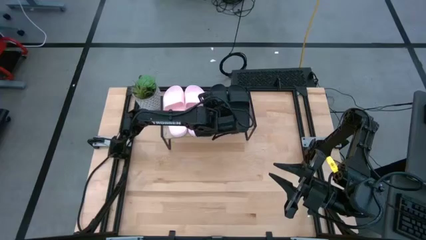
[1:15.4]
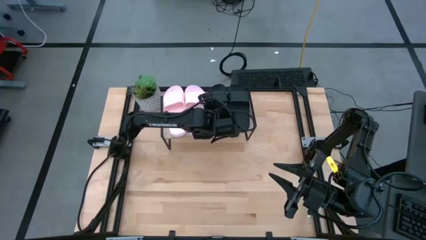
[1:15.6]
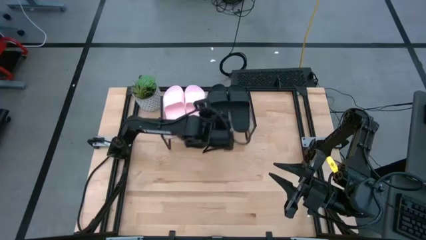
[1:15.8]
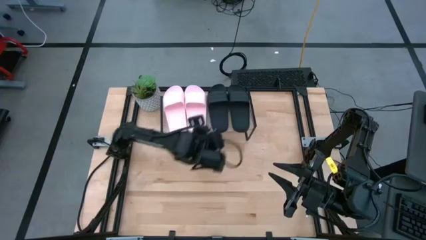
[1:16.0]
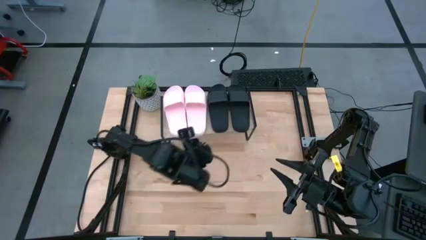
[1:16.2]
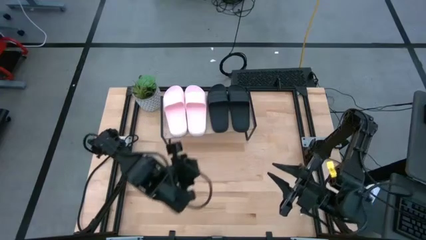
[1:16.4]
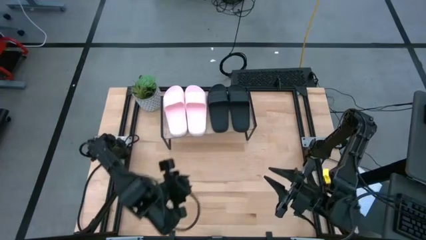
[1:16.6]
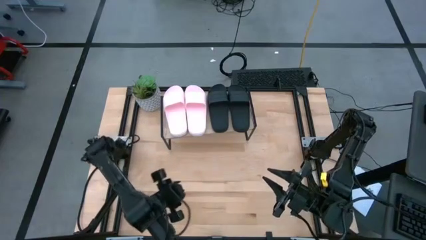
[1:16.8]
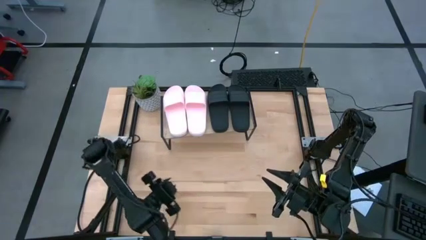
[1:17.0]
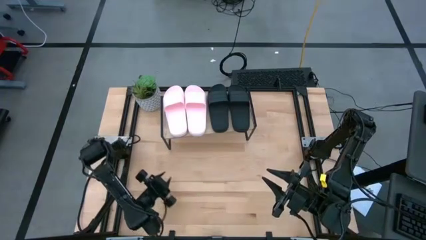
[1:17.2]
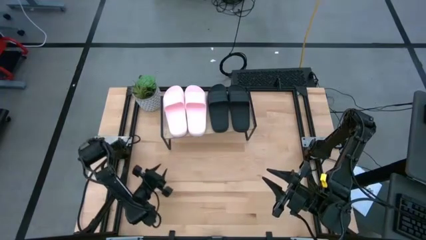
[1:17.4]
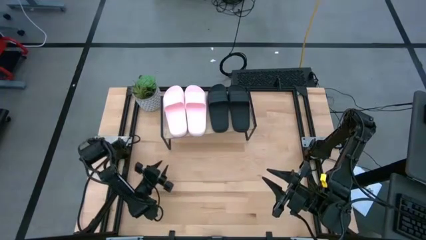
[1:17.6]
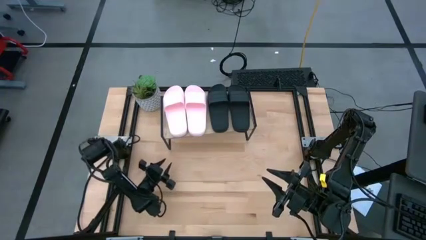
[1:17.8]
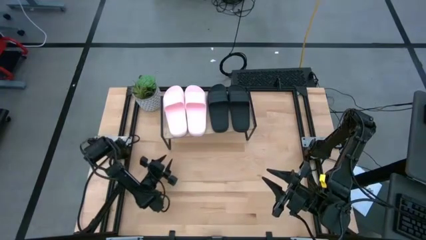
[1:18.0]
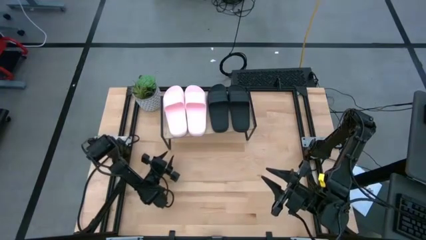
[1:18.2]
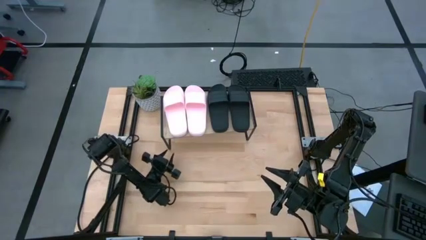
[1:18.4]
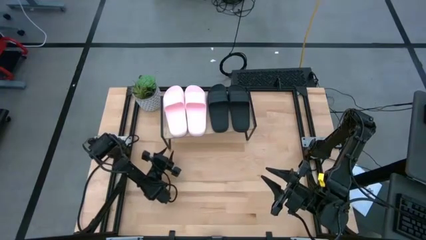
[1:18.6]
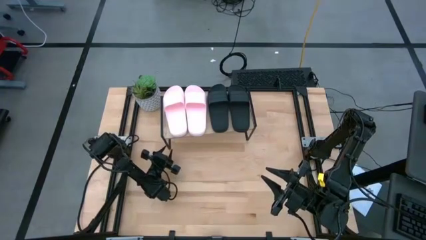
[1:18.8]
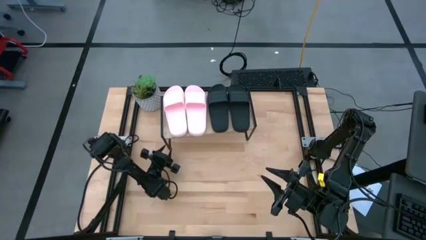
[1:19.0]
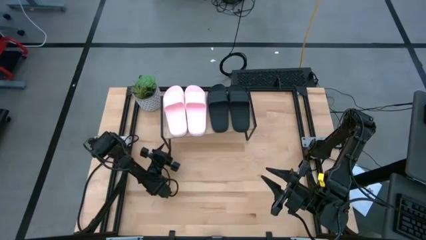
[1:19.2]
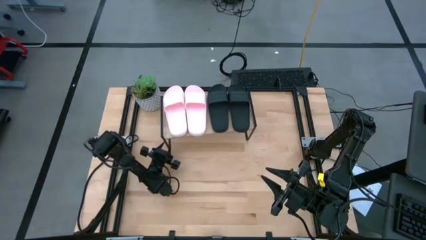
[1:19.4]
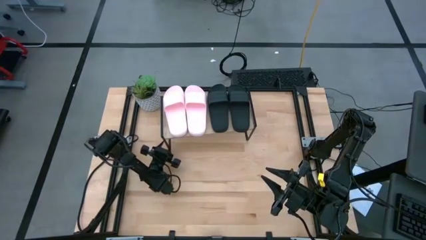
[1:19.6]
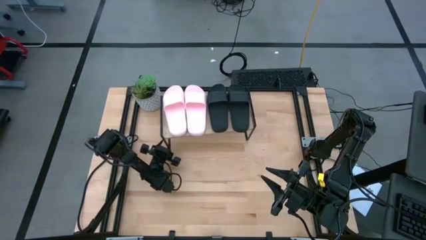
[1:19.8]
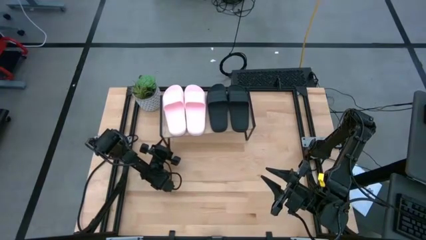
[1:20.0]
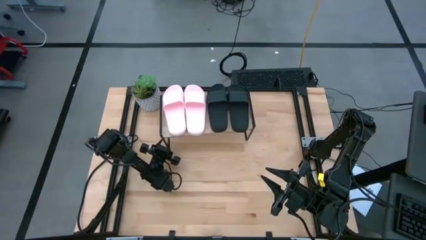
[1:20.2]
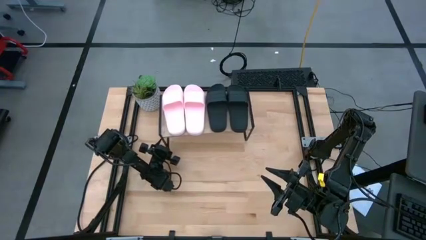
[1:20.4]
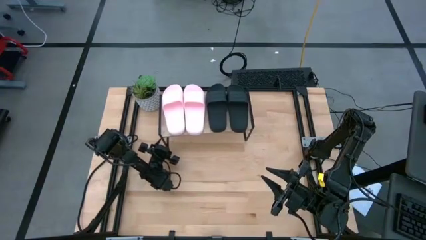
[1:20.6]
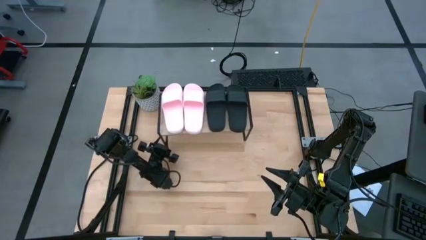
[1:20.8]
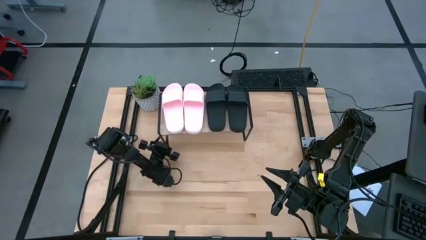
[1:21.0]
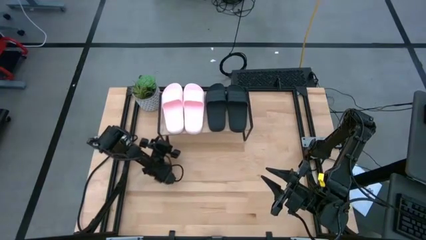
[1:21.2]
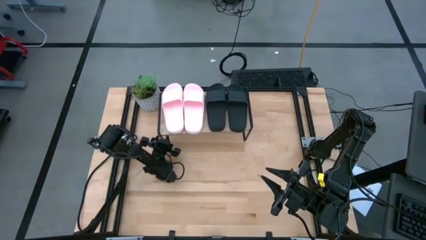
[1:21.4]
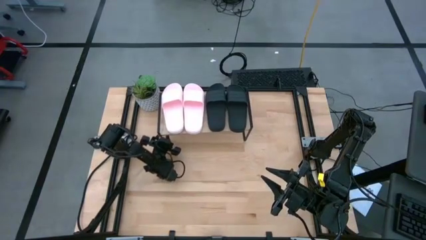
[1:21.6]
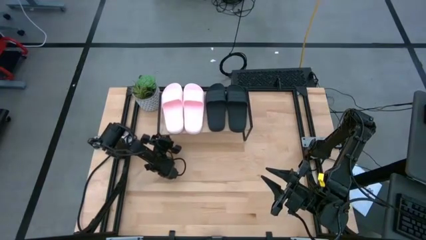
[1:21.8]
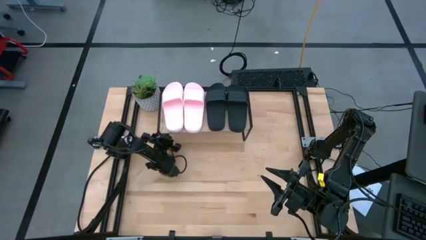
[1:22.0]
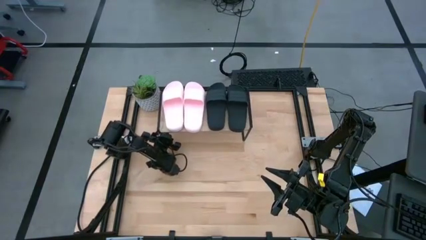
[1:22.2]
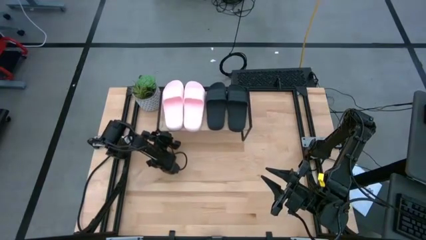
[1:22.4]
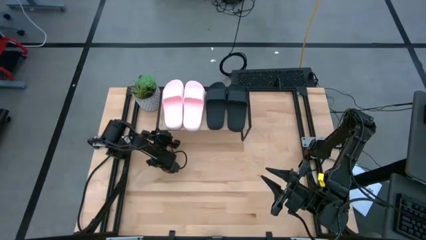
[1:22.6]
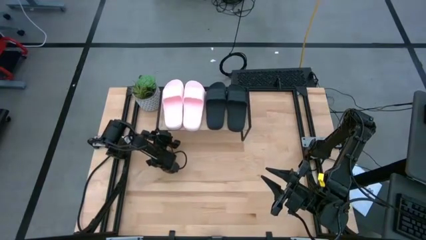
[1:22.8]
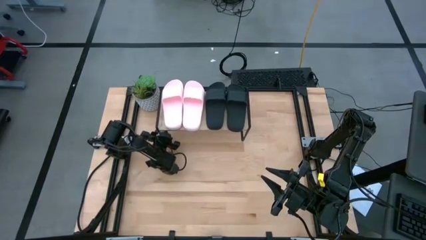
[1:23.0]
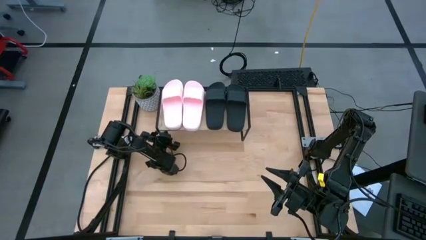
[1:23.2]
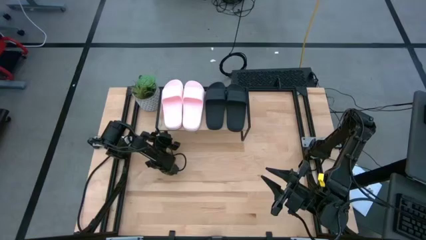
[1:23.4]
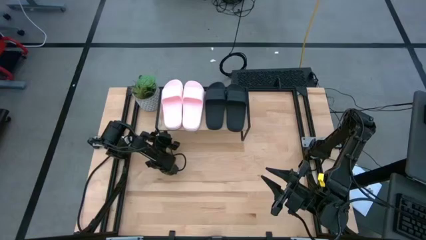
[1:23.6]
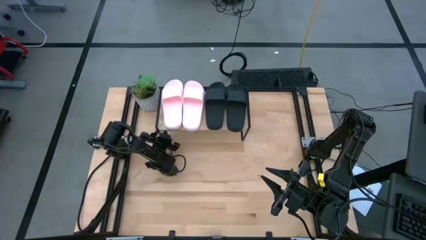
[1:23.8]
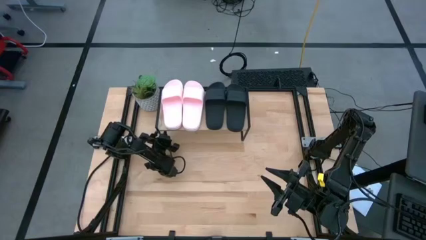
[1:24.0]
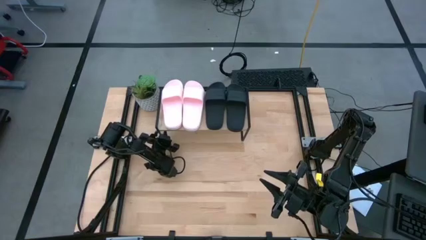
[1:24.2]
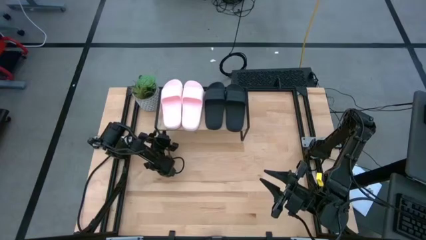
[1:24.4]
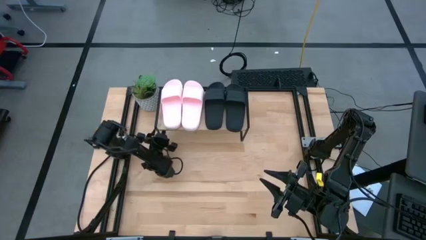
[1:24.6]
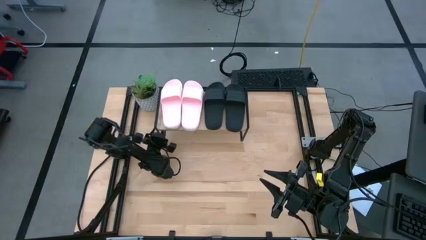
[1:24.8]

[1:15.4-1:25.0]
Task: Pick and place slides into the shelf
Adjust the shelf

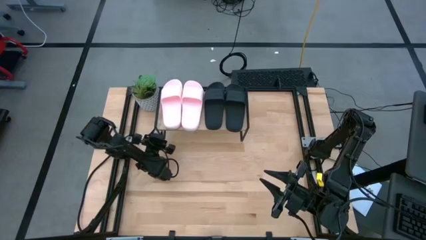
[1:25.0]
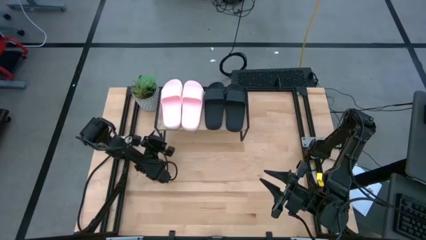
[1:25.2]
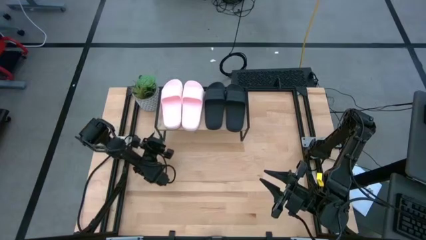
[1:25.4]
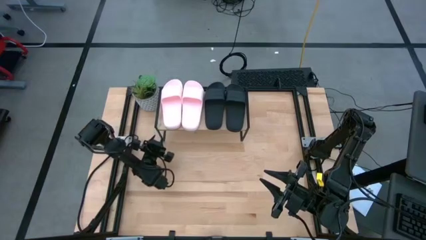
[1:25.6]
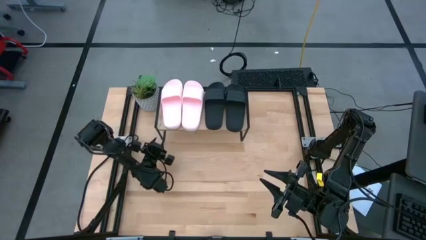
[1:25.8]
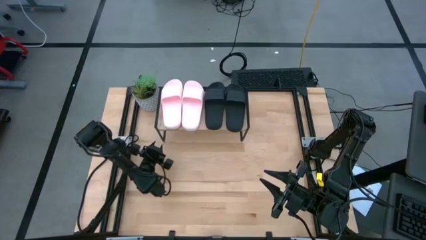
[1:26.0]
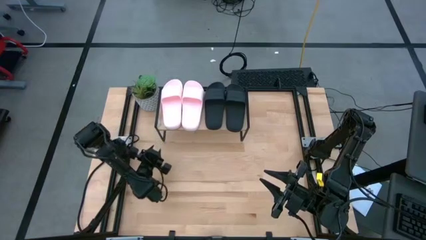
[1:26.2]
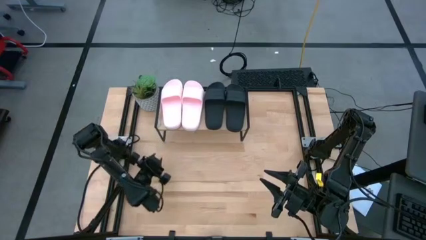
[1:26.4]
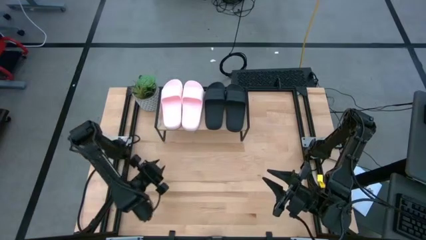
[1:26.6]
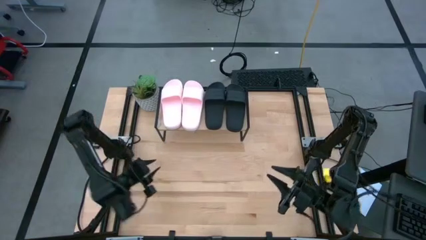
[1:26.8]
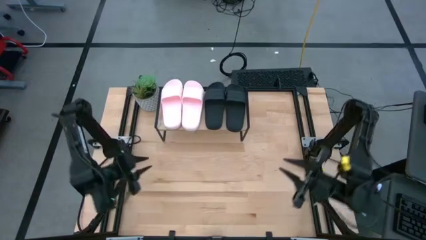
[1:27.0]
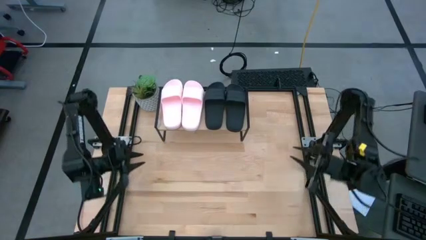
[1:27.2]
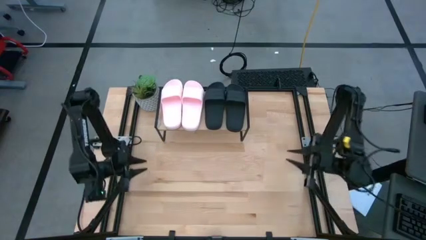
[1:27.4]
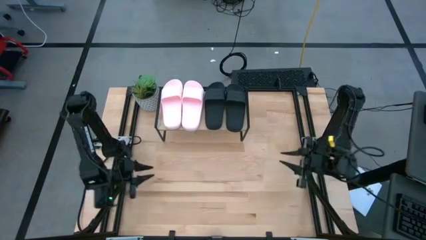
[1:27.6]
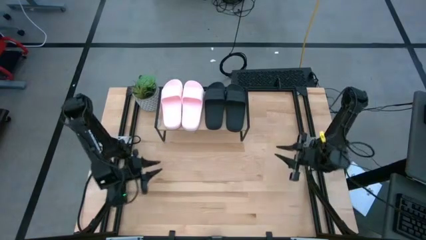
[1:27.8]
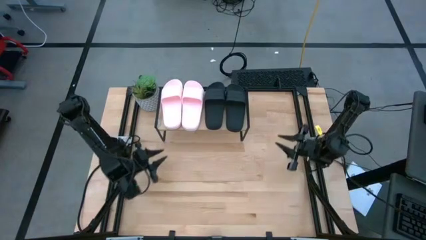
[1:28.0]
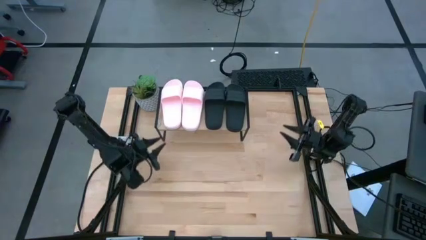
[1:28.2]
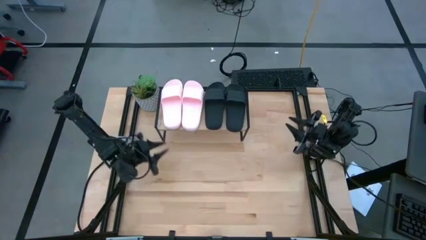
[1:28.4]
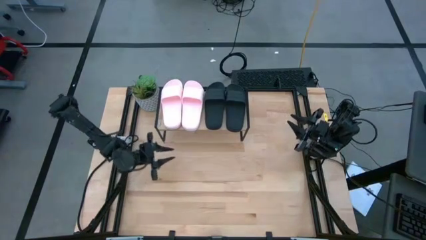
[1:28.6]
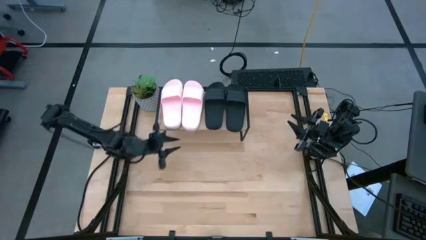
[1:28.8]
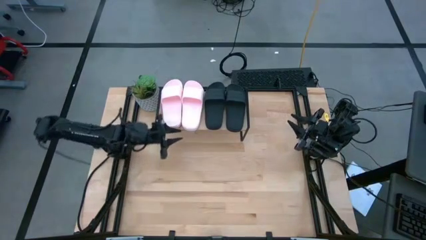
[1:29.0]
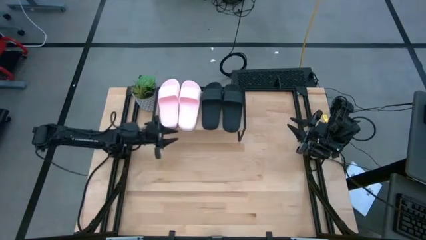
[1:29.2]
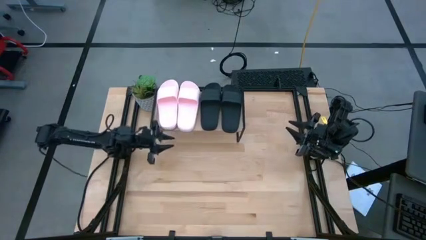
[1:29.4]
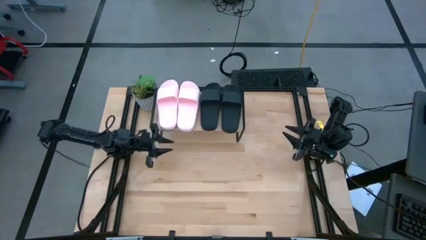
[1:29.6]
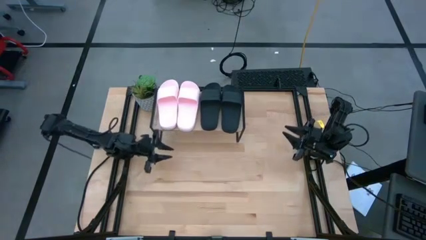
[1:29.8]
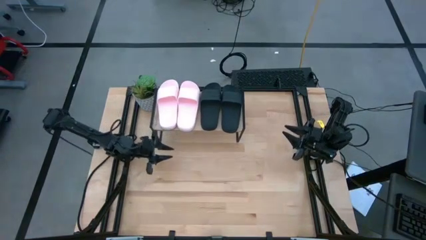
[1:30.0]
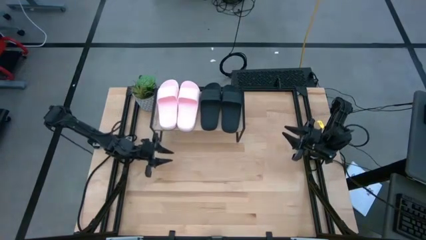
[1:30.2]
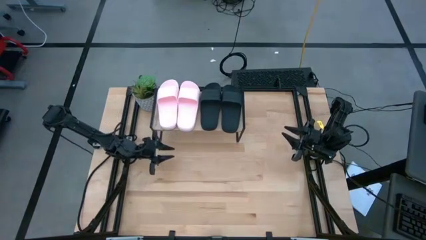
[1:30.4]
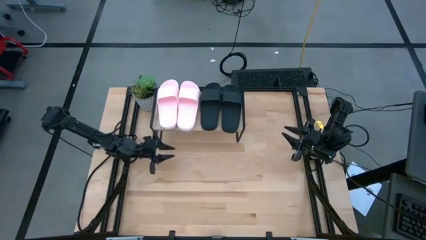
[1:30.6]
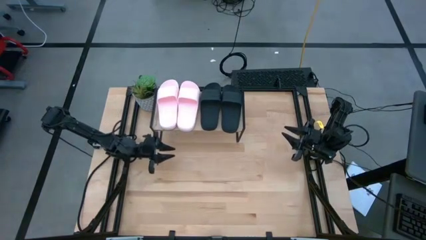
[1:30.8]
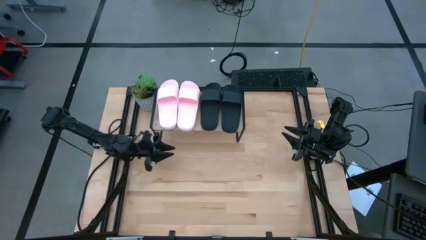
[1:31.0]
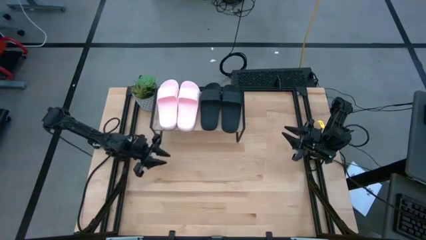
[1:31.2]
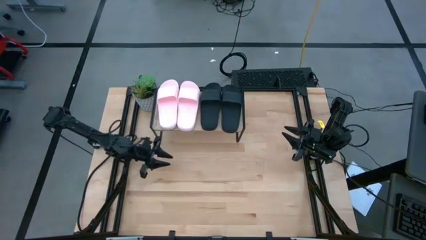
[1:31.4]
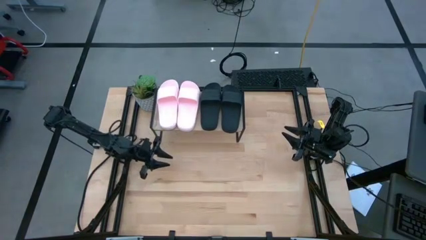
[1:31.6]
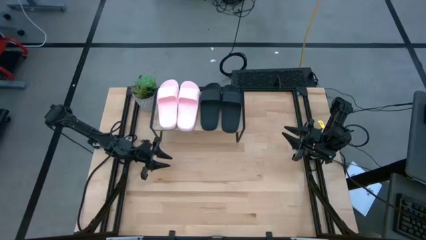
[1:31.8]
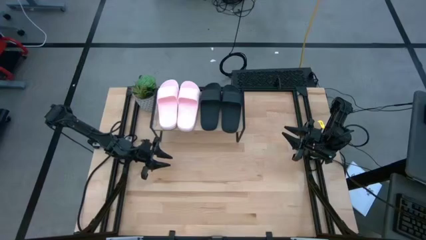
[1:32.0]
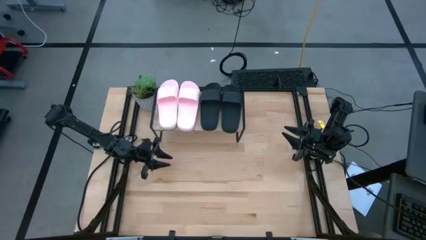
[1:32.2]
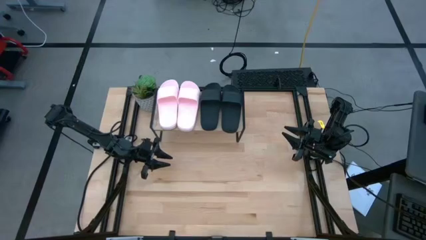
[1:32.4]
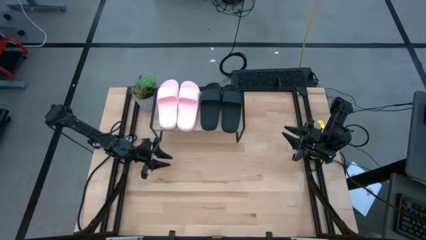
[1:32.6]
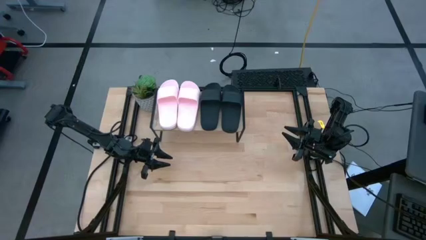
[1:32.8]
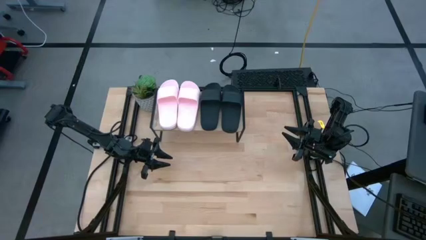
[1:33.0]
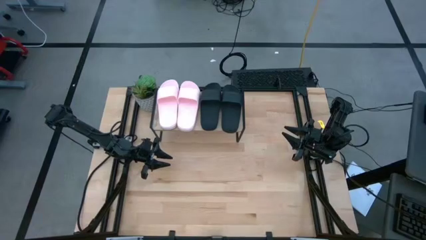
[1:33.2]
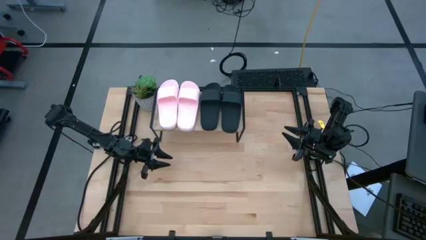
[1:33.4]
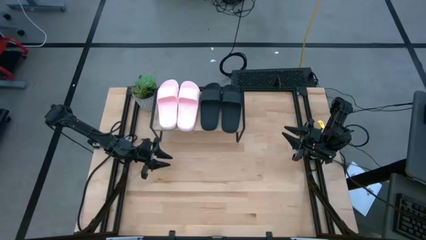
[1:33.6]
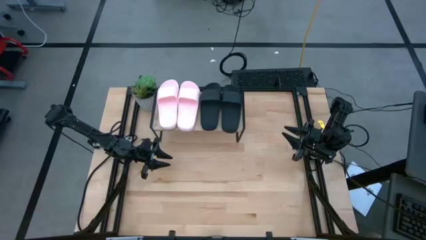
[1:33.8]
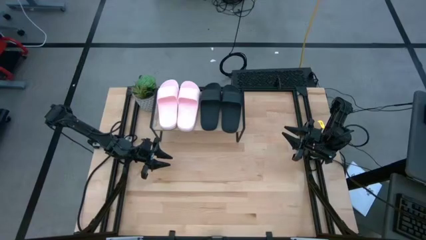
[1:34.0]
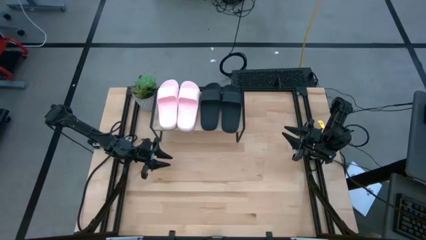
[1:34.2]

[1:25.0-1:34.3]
Return to Home Position
